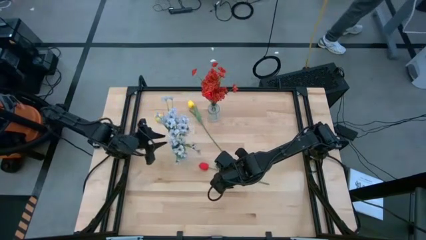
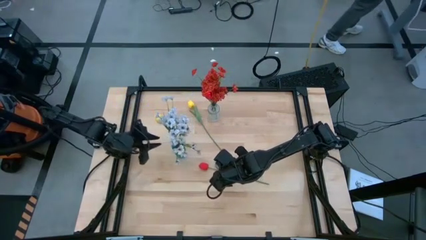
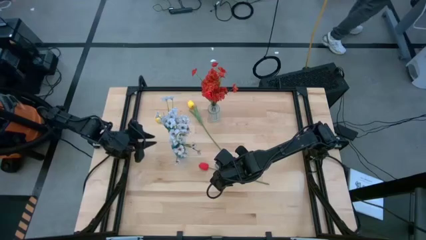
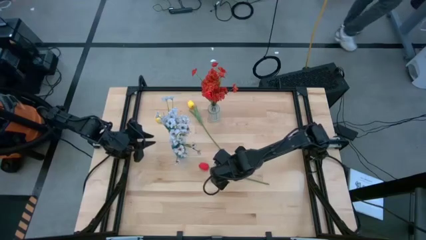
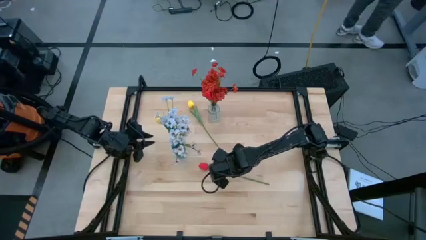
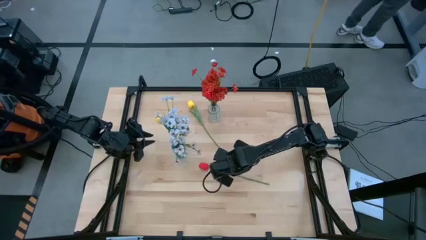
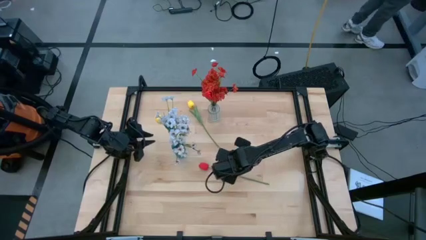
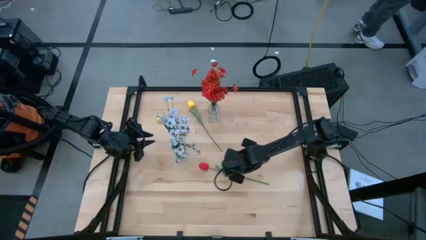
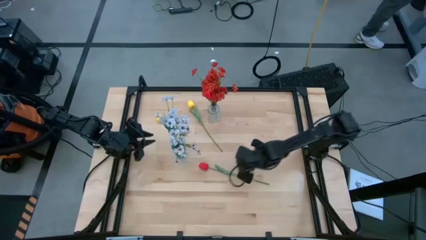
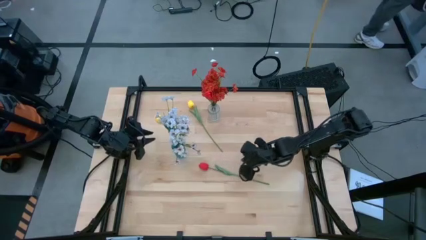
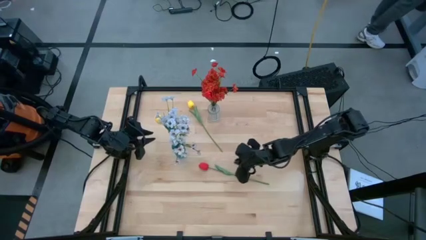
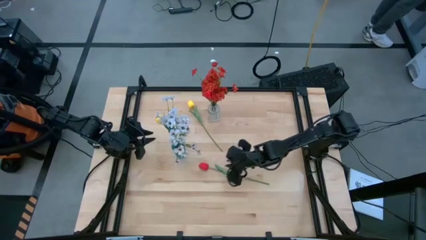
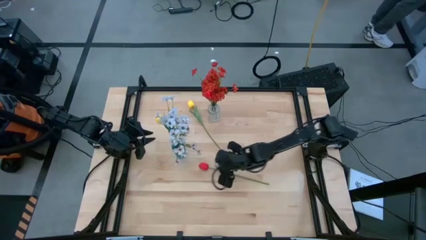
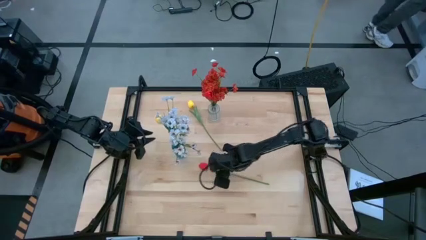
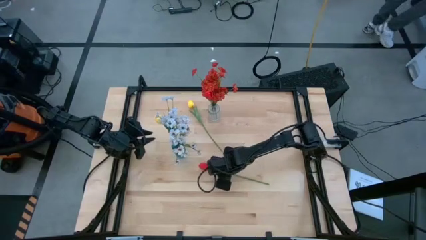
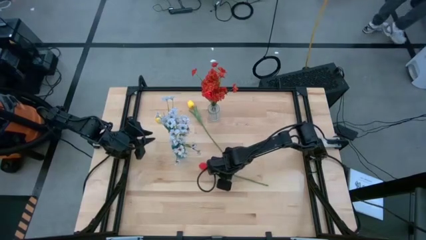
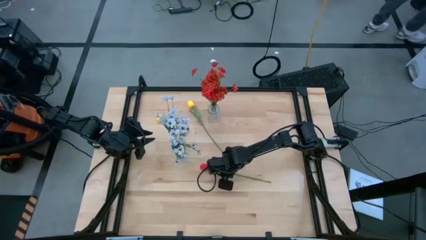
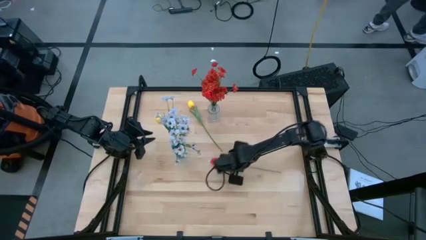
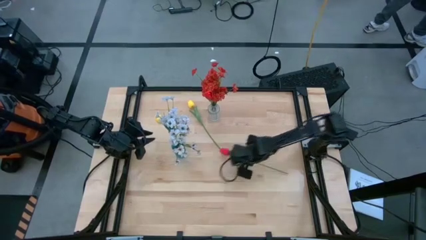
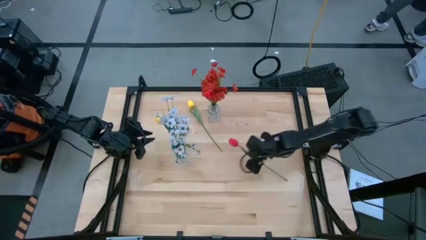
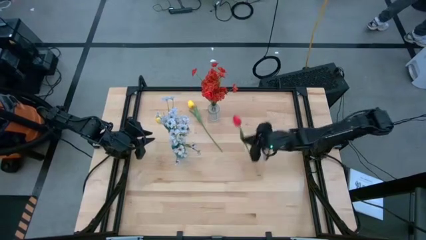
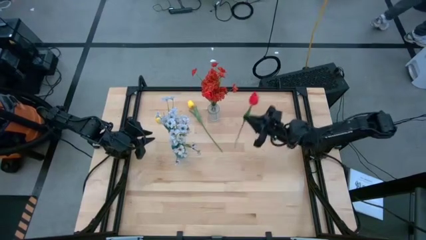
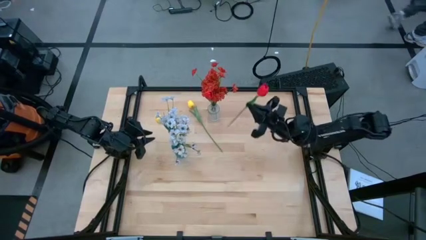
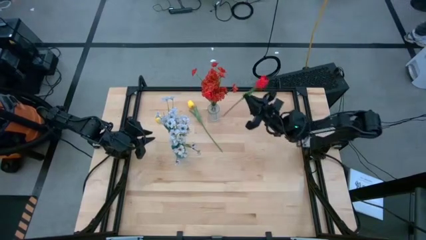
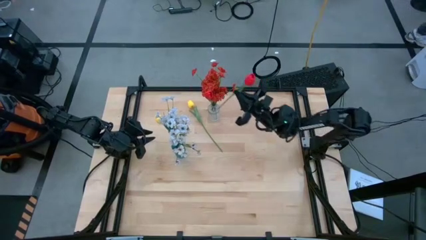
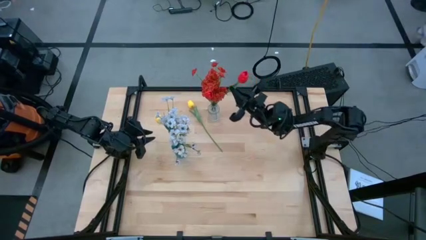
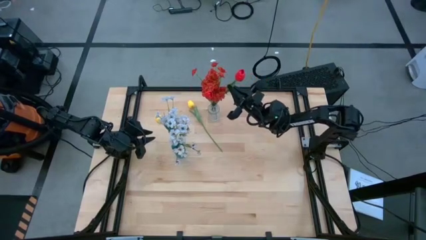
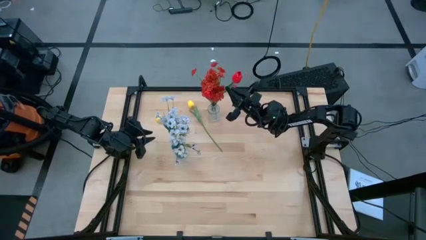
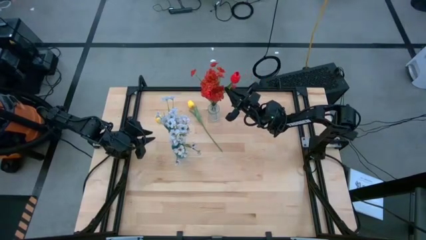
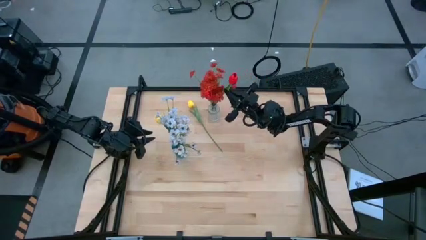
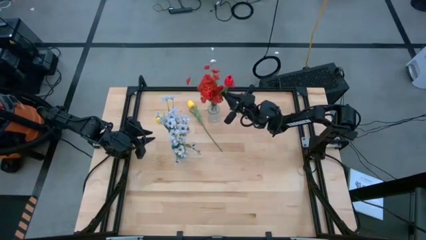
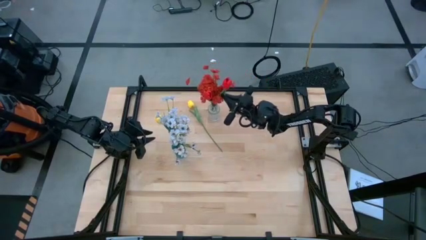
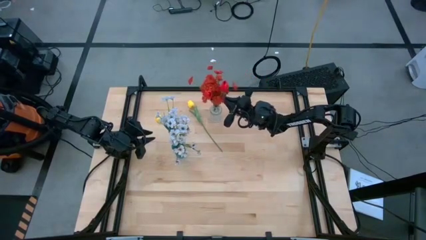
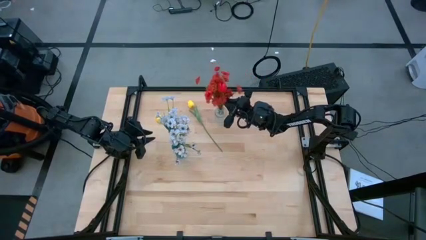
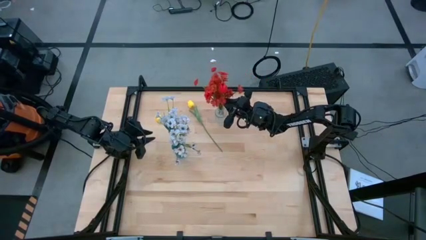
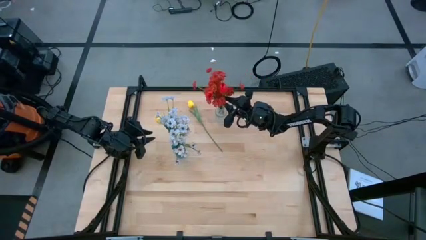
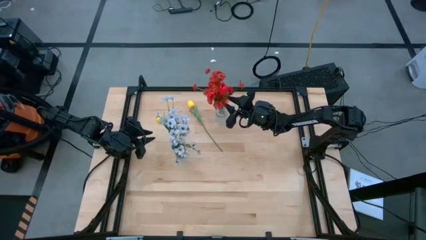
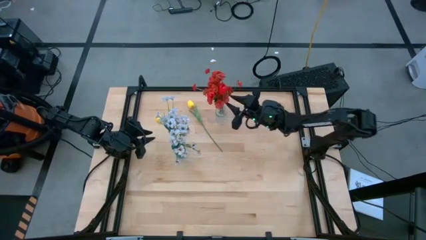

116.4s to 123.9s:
Task: Sort flowers into vase by color
Put the red flower into the transparent vase

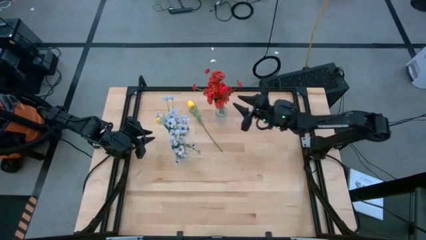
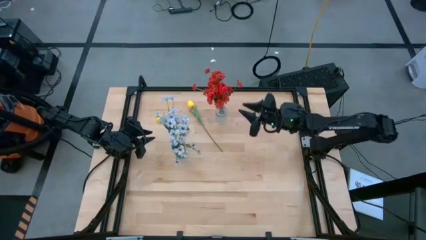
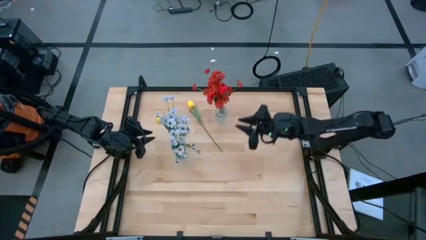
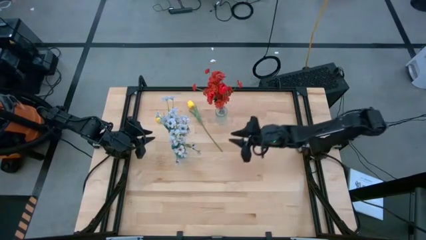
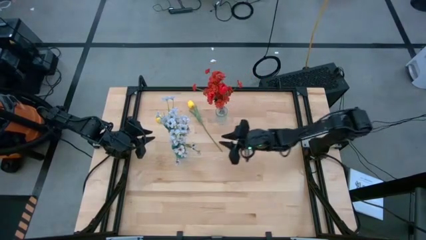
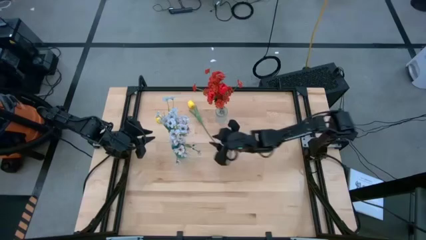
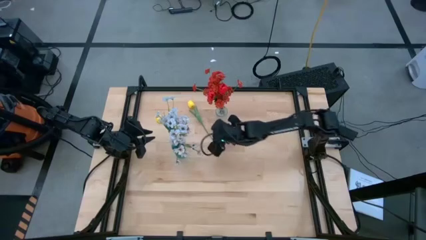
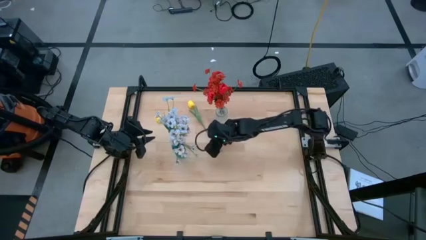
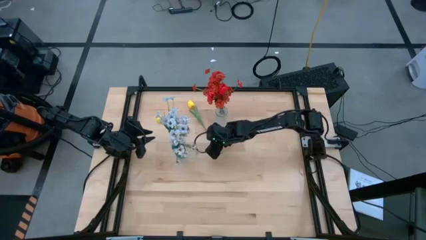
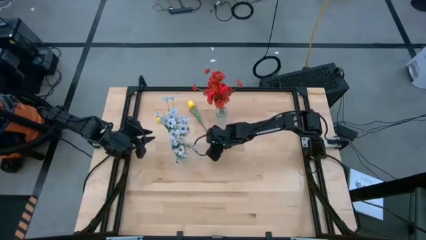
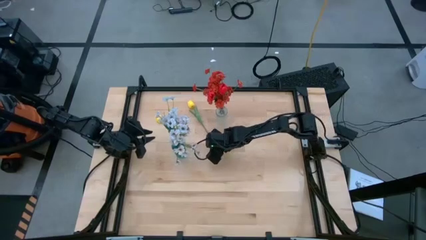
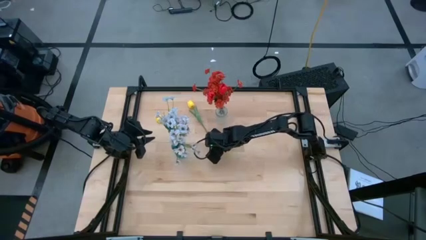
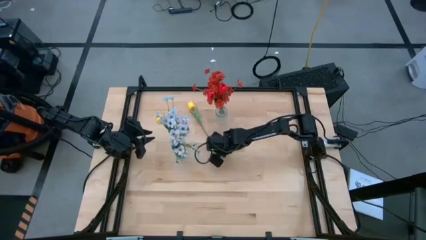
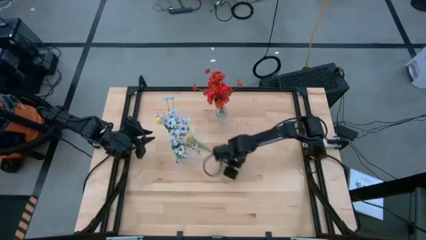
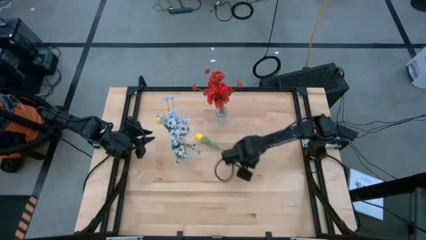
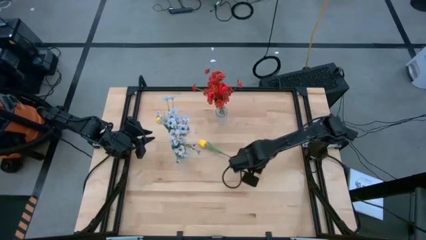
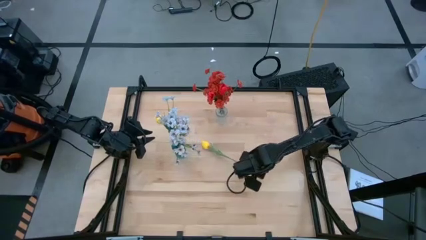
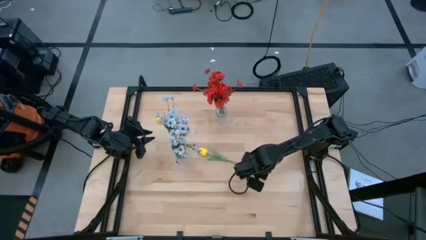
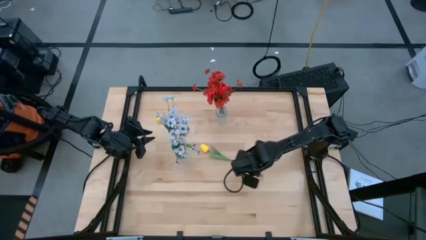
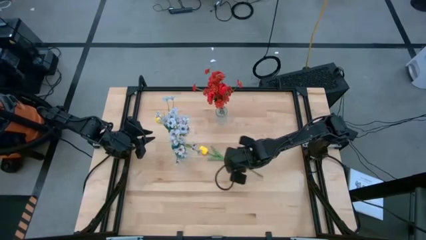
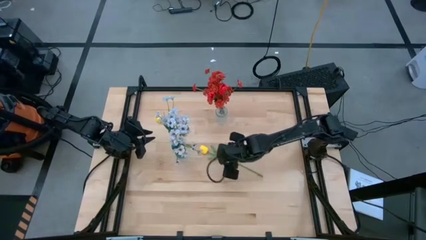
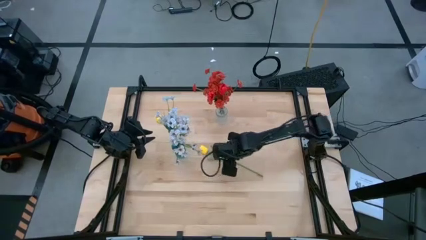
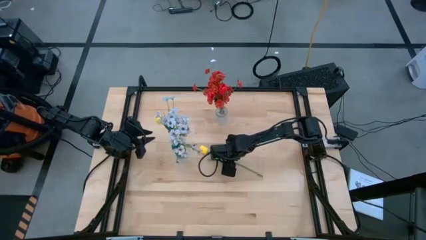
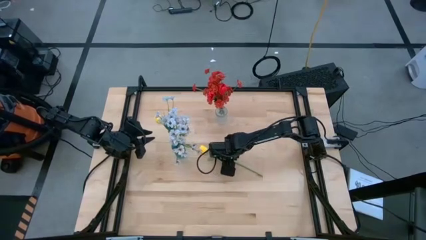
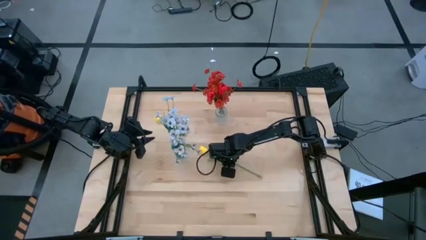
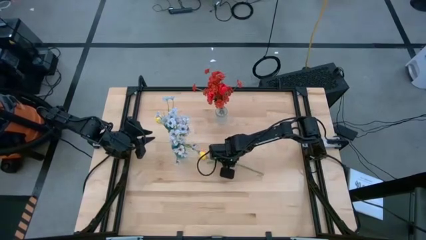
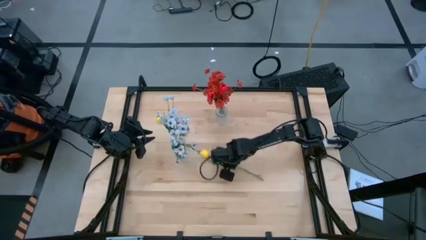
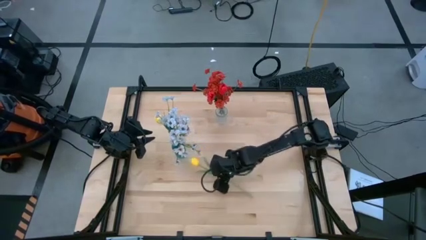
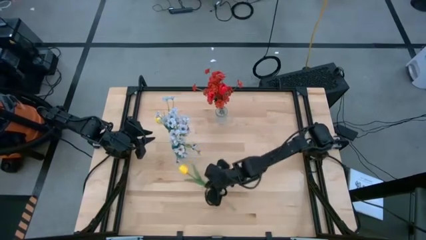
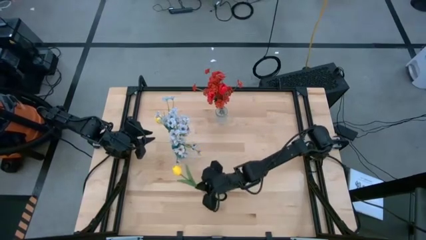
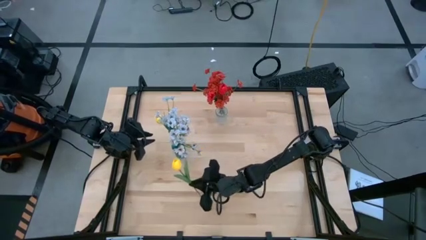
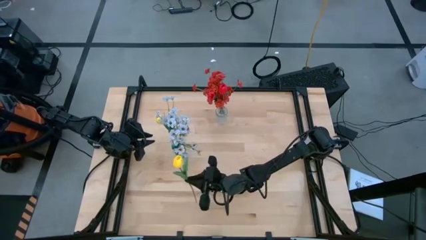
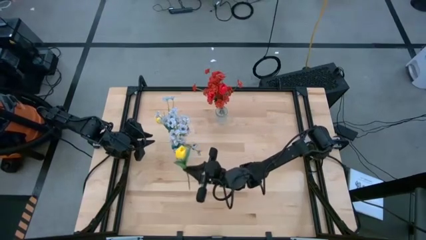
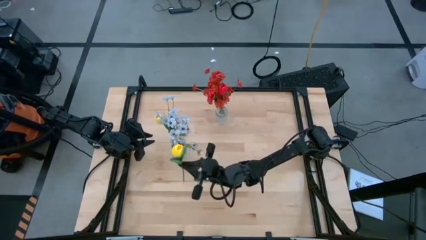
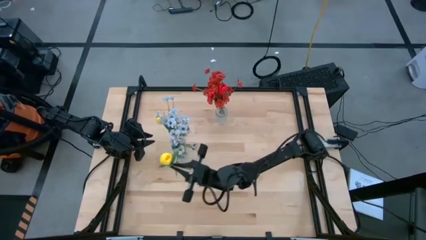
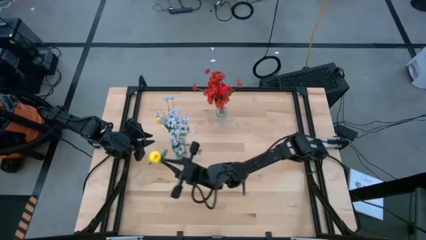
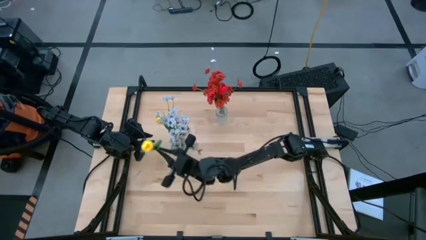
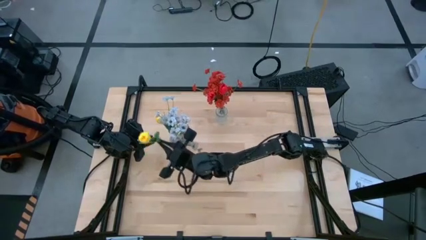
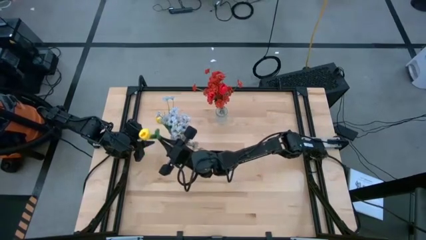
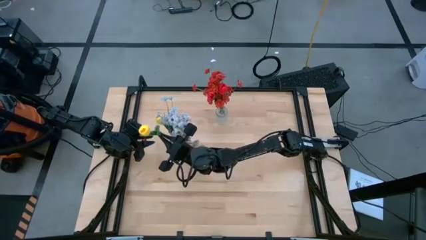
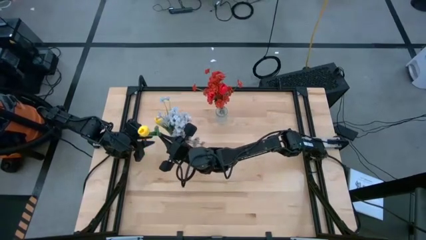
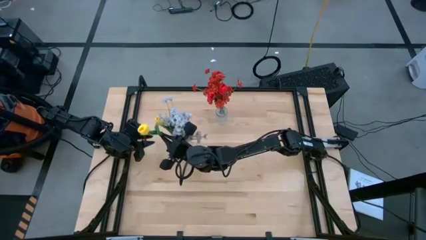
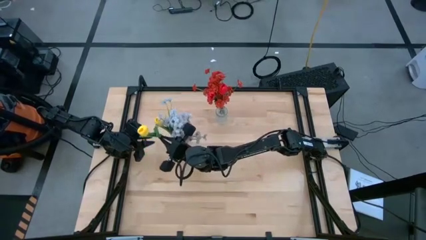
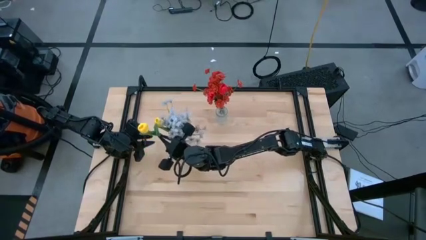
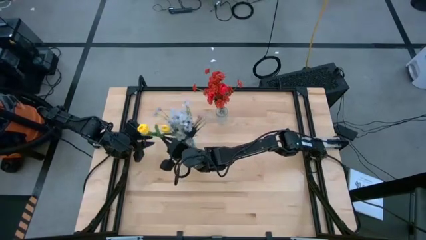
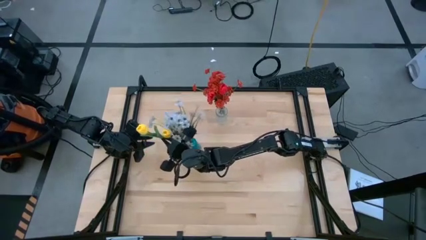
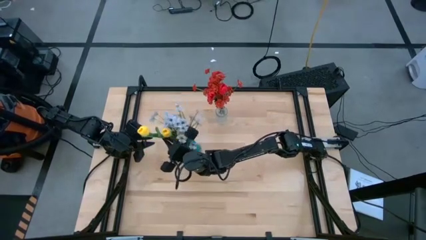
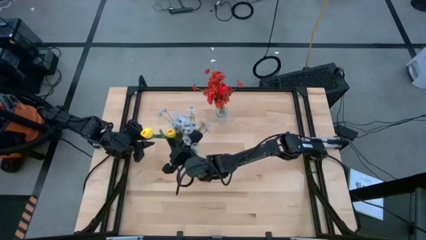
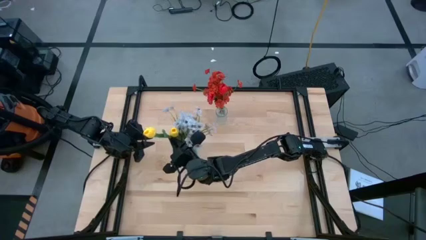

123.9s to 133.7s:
Put the yellow flower into the blue vase
